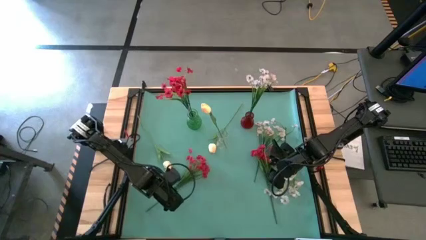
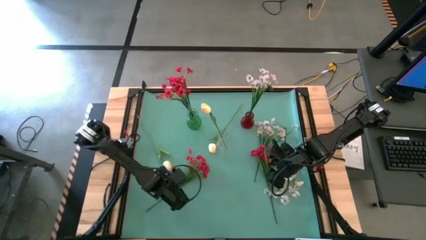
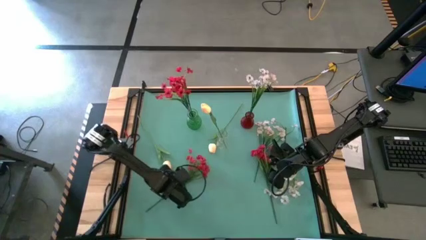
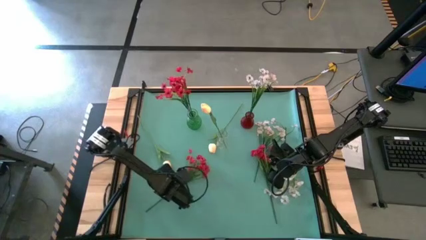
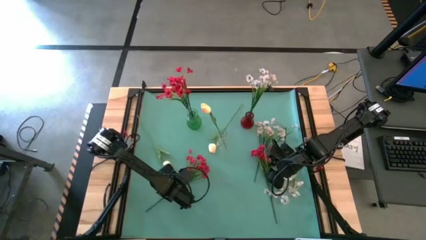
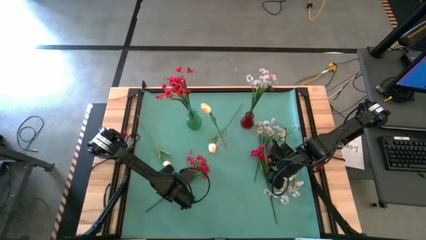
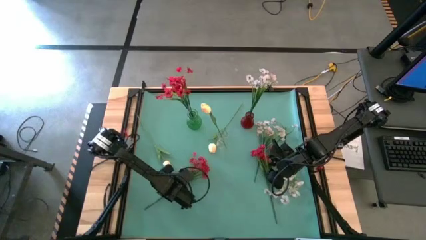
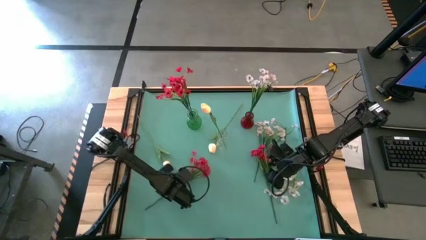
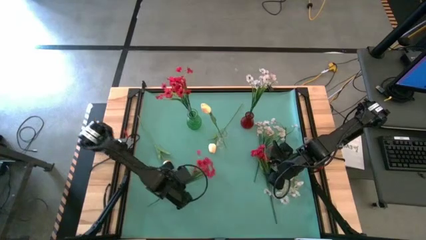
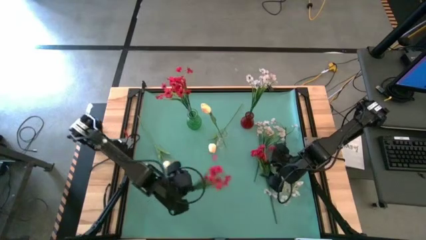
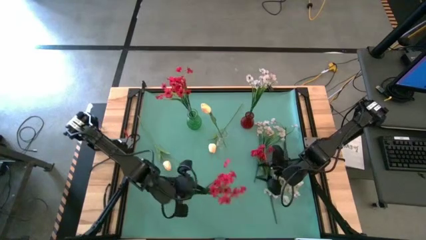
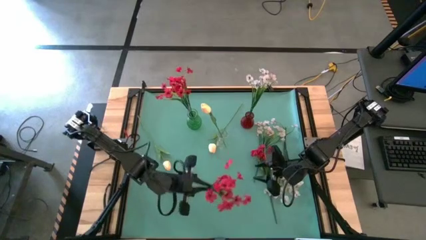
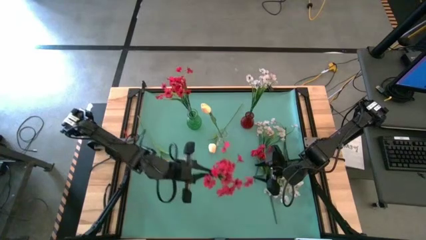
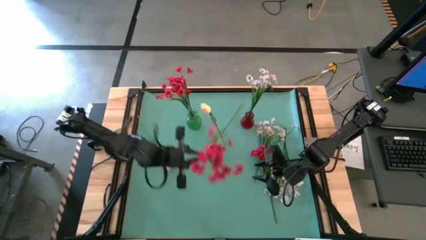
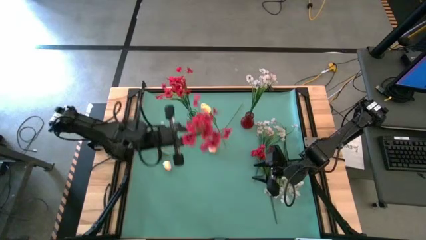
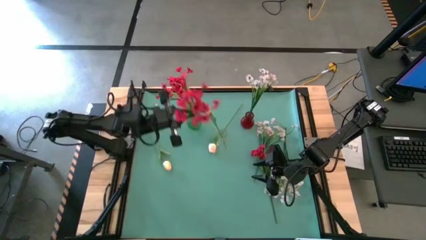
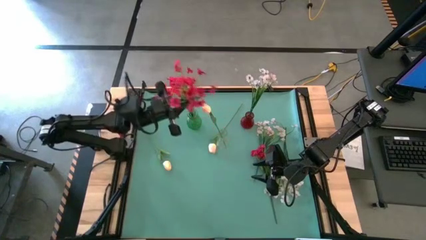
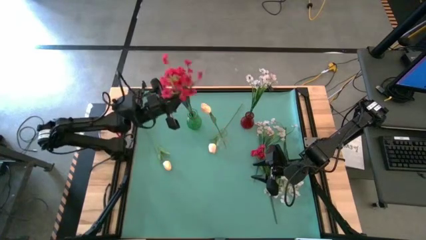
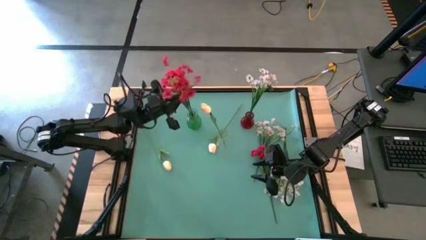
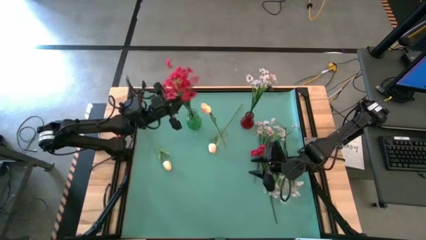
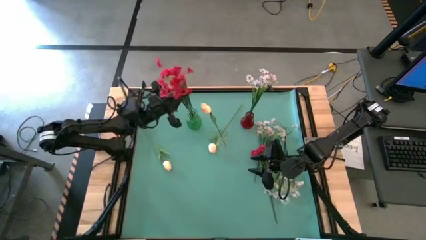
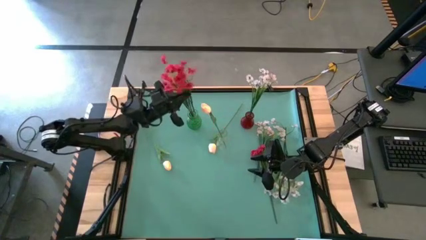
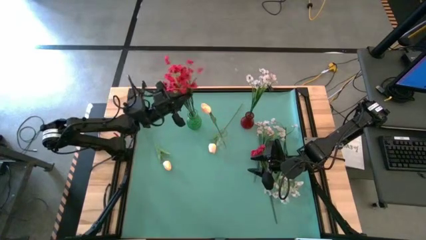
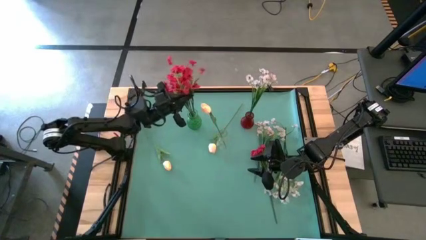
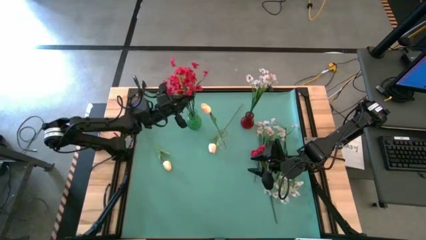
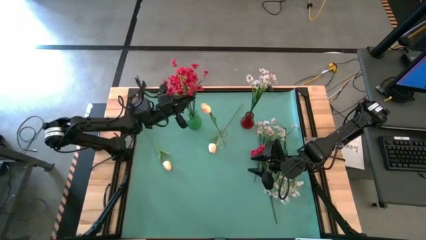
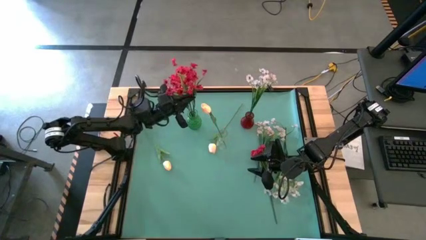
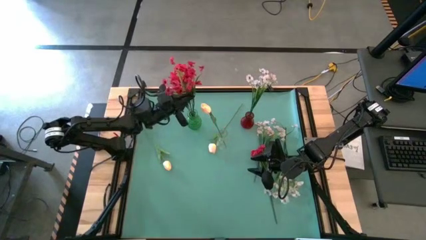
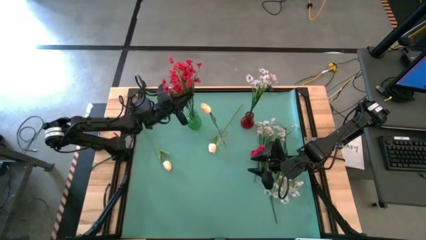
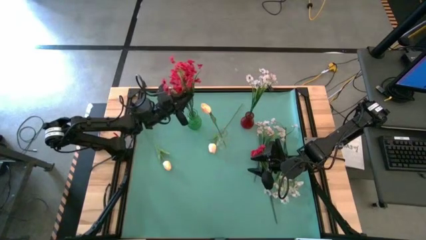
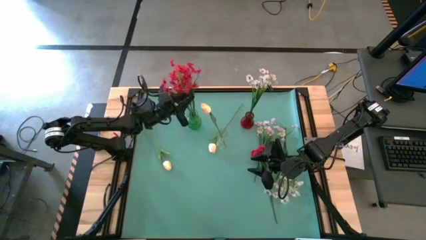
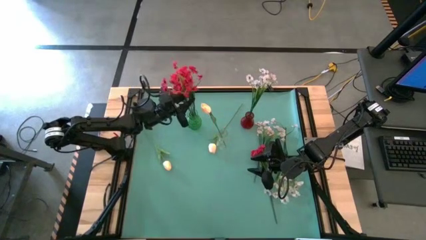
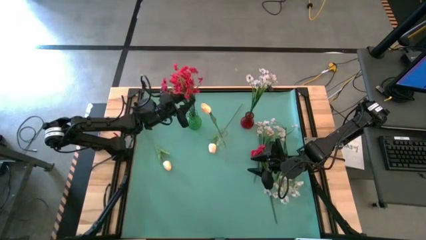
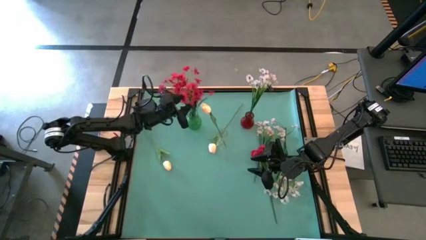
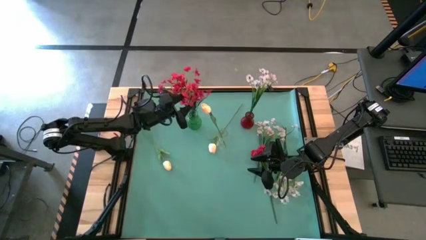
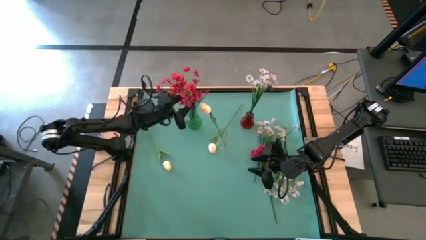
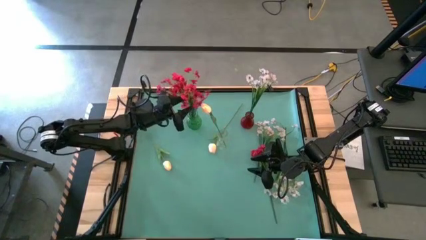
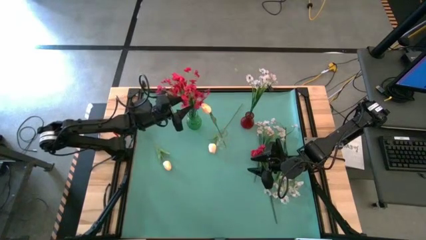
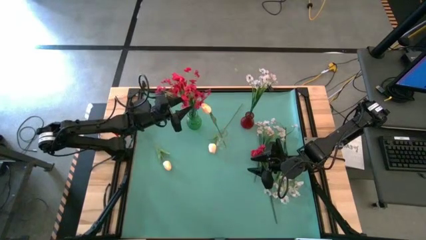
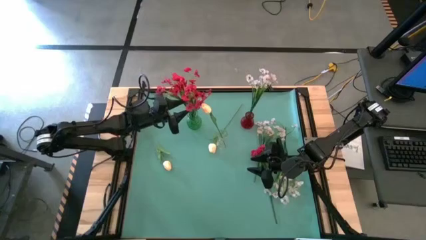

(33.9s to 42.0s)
Task: Sort flowers into vase by color
Put the left red flower into the green vase

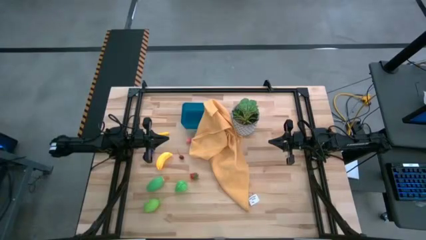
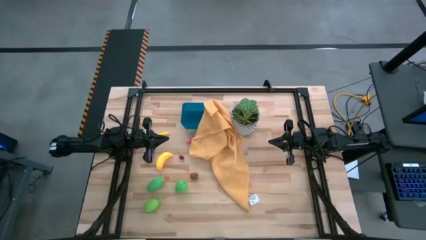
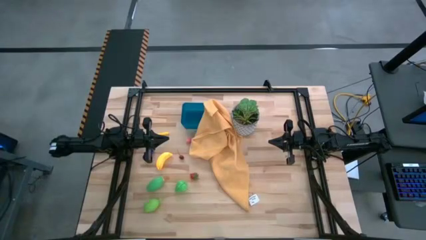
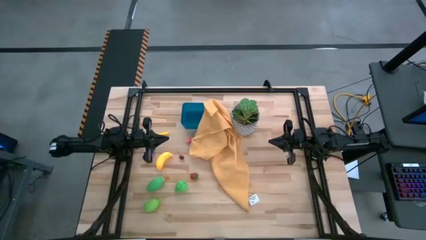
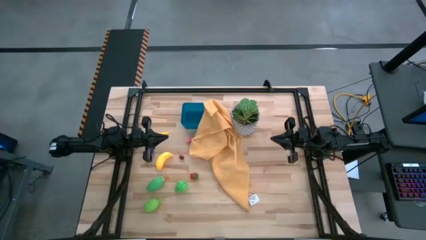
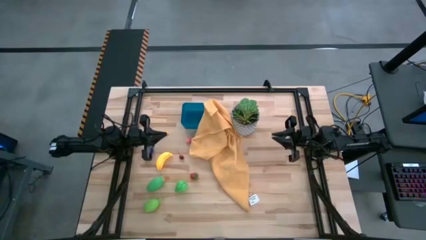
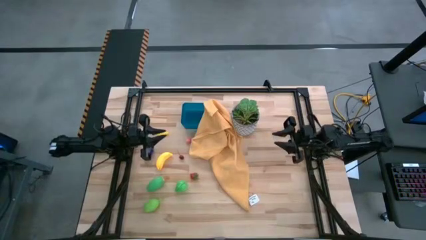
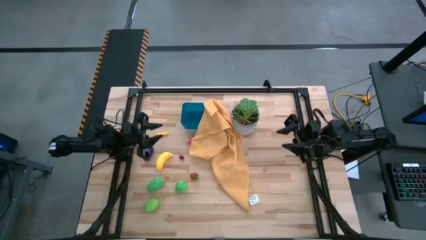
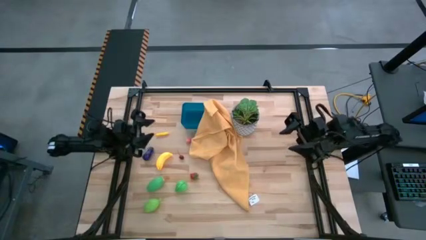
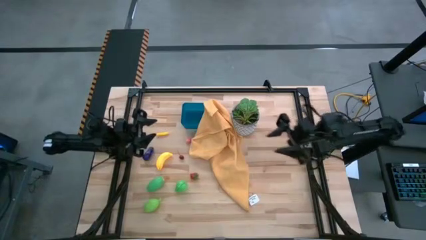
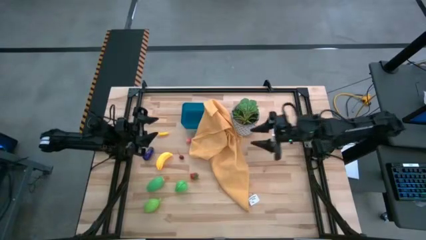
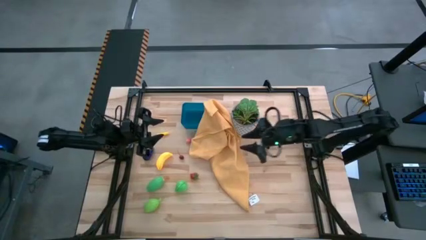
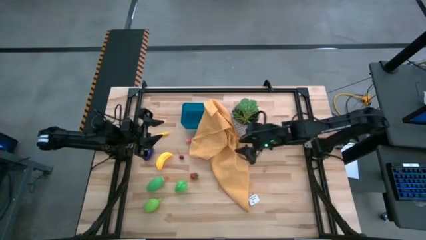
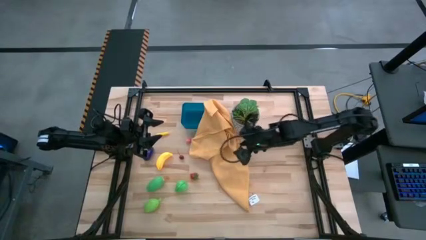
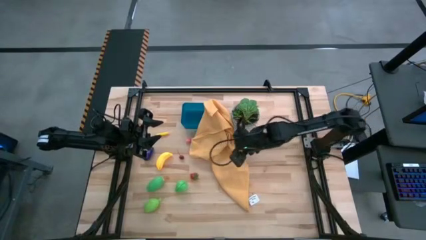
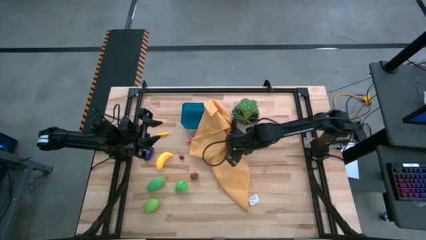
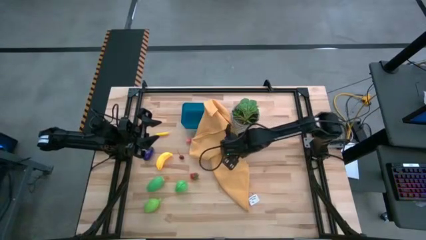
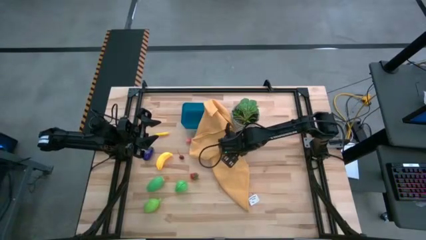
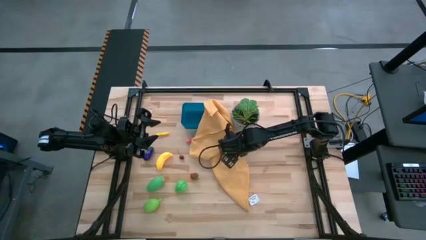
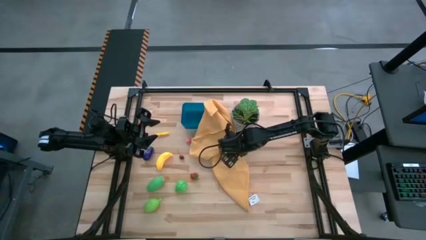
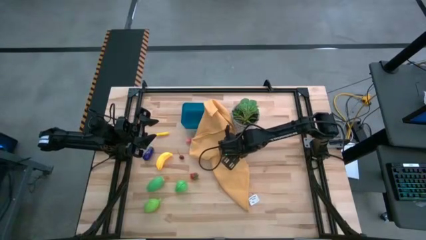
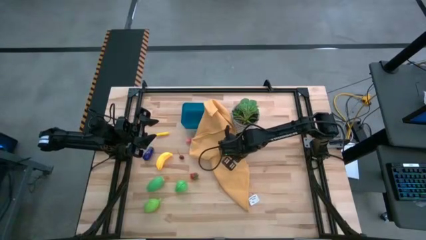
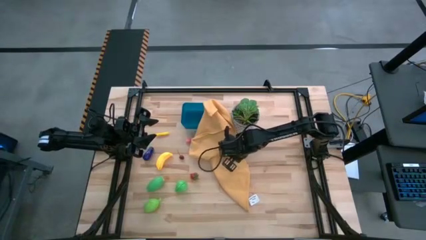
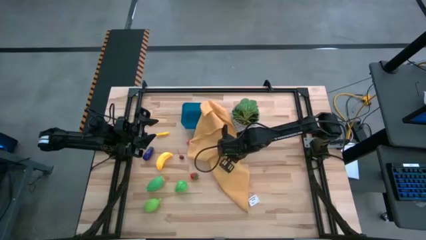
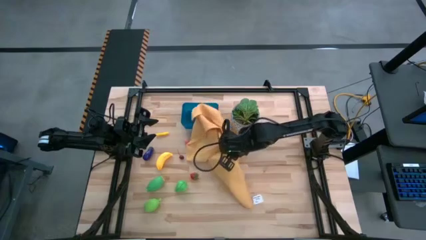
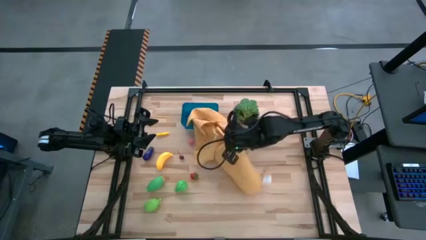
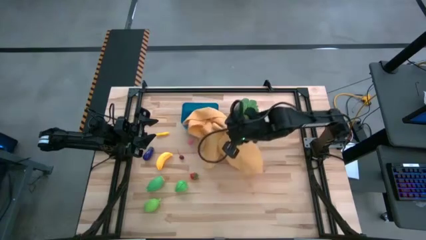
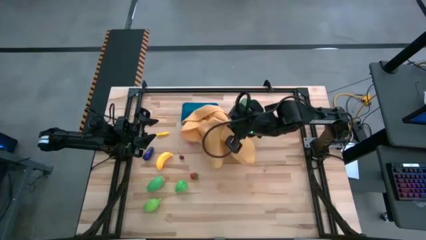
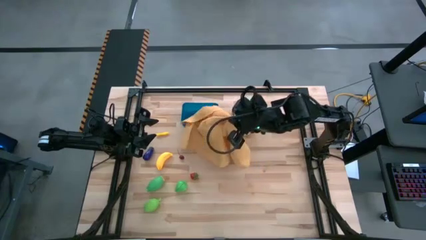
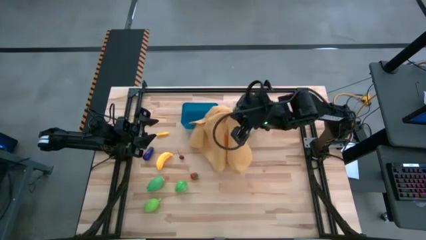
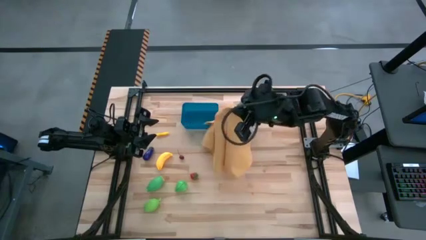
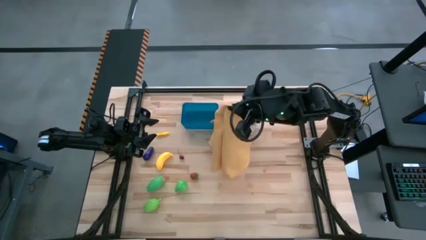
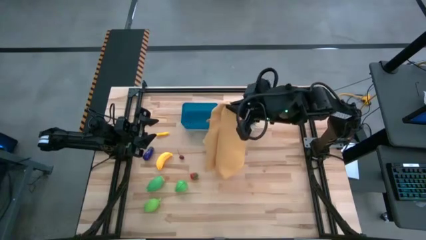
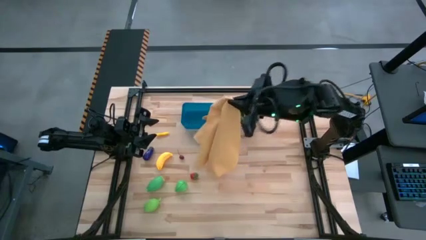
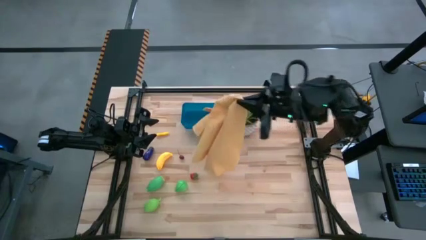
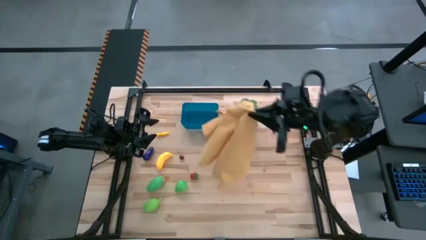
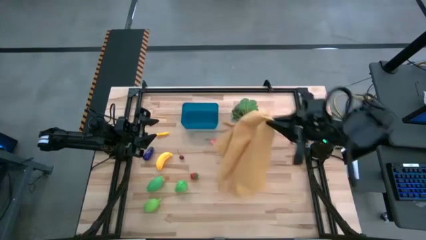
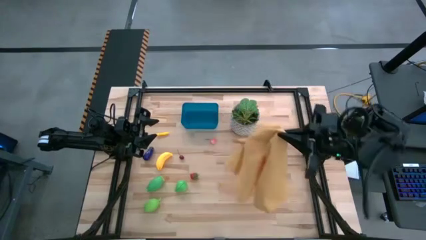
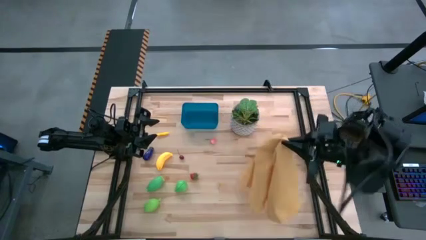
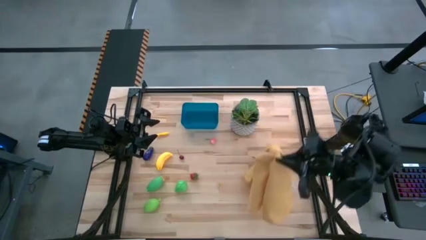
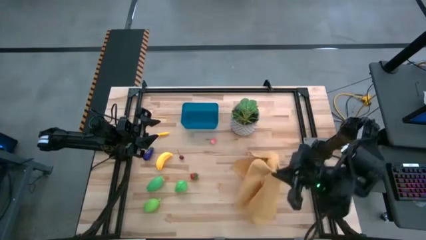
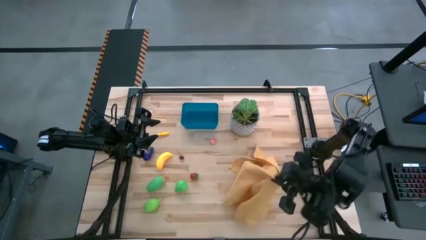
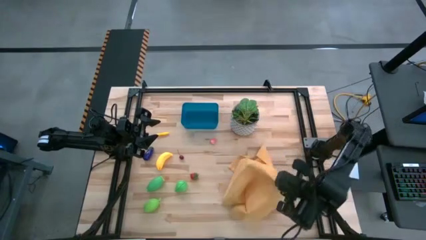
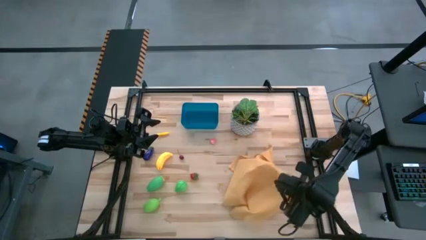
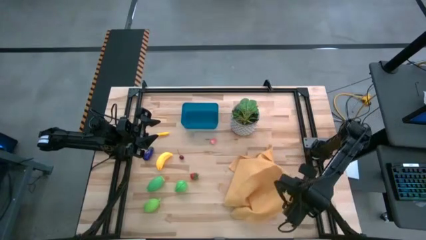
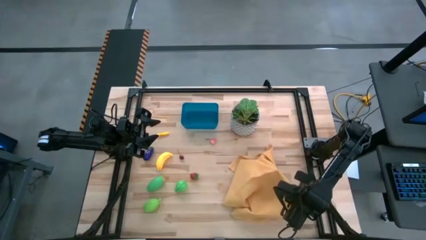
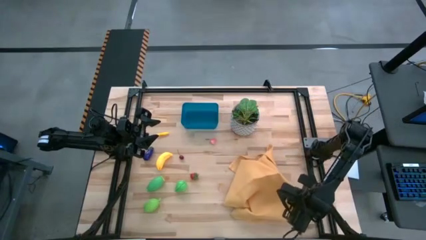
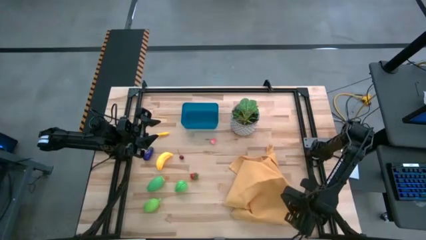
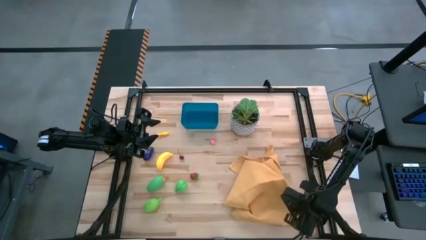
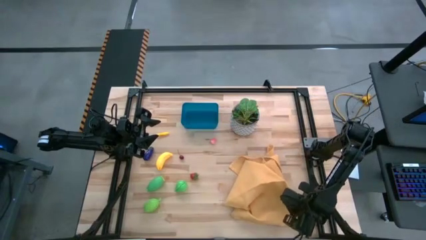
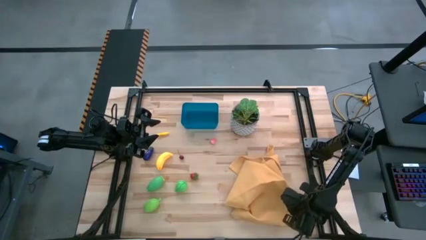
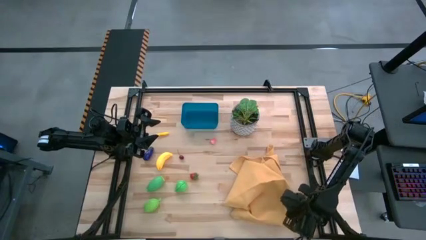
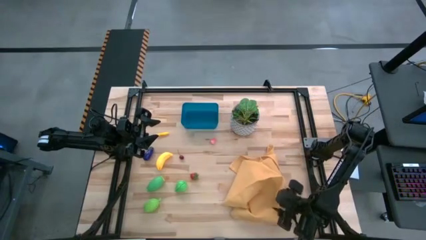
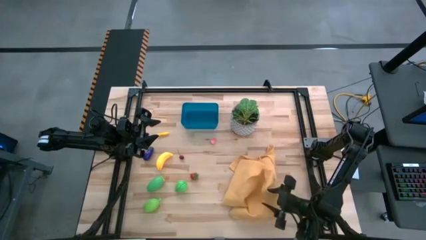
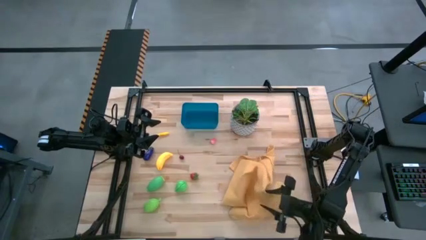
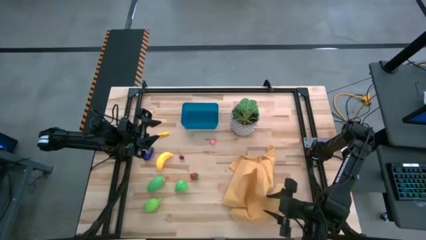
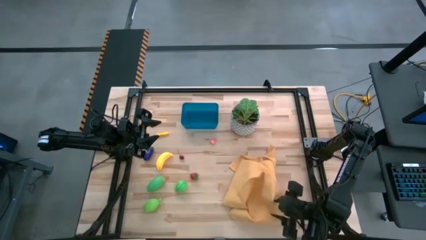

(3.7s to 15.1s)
Task: Pick and placing Produce into tupperware
Move the yellow towel to the bottom right of the table
